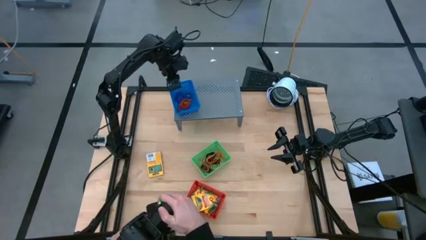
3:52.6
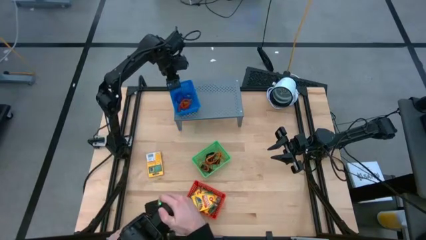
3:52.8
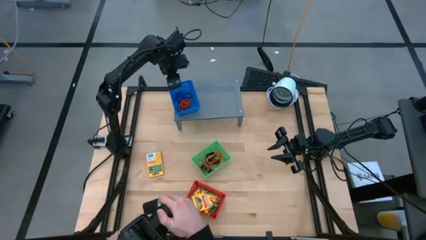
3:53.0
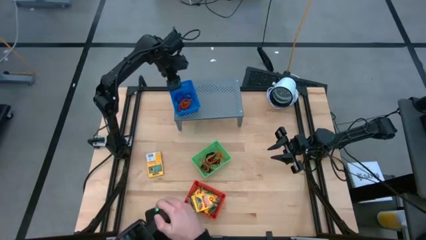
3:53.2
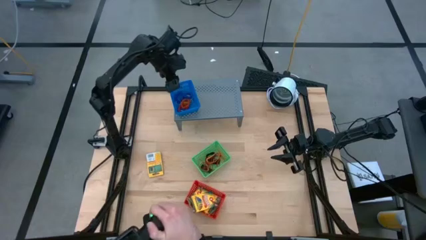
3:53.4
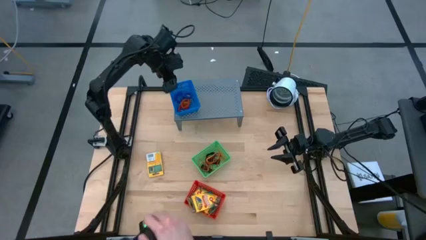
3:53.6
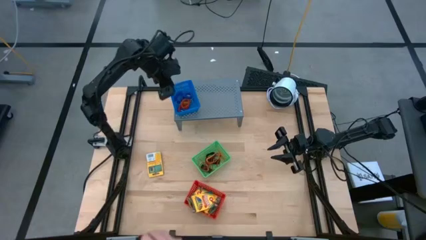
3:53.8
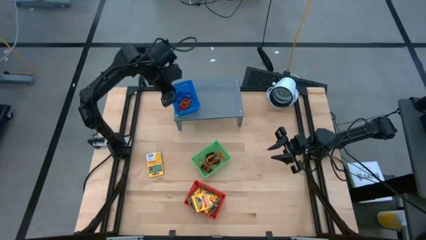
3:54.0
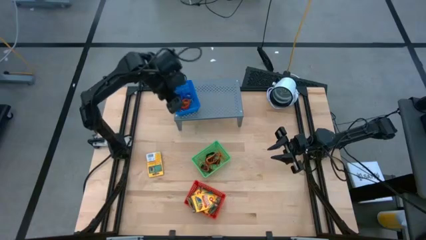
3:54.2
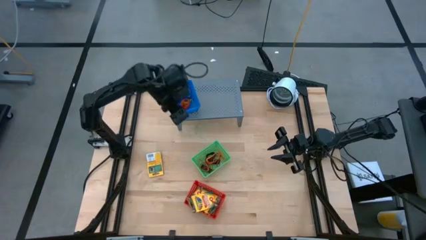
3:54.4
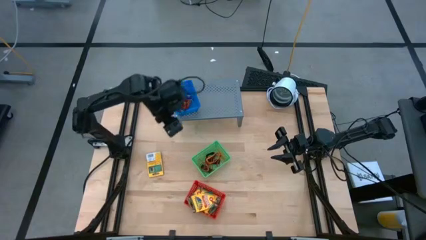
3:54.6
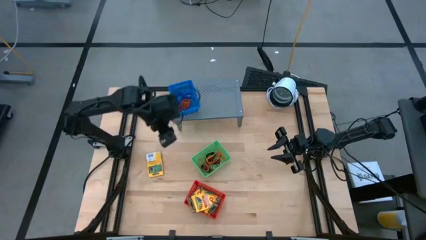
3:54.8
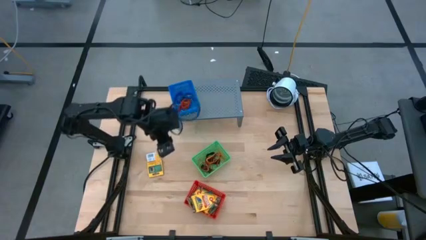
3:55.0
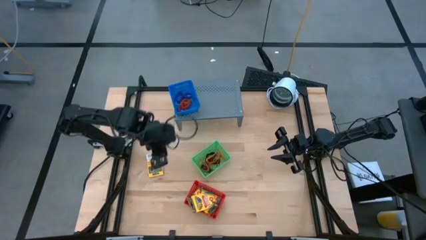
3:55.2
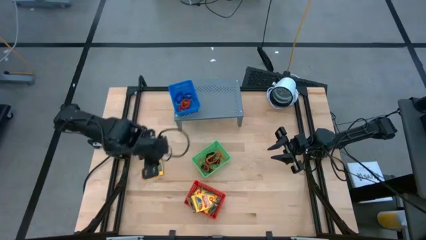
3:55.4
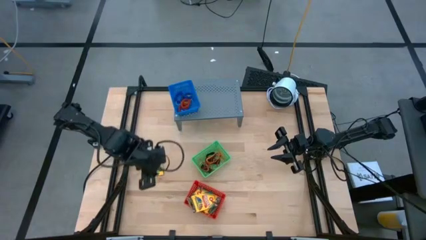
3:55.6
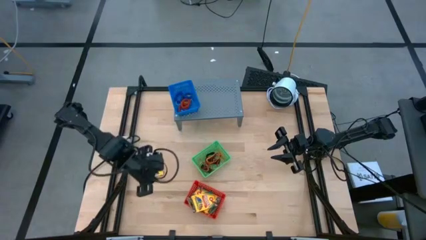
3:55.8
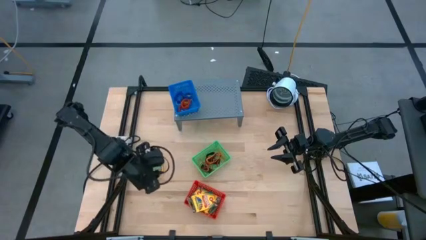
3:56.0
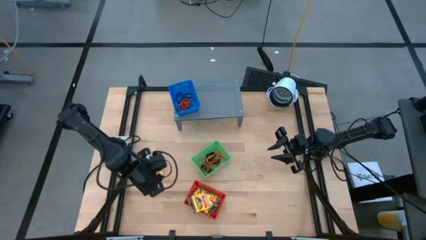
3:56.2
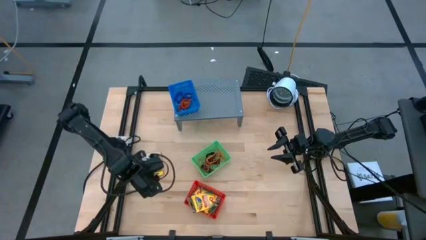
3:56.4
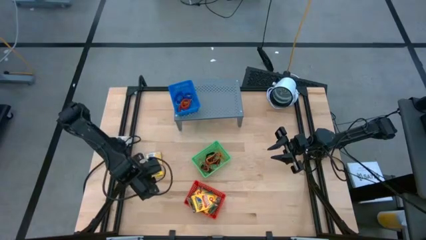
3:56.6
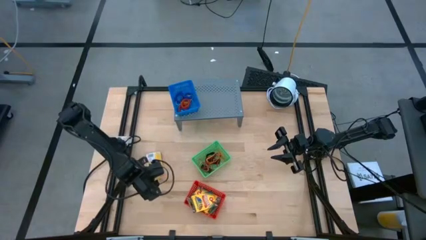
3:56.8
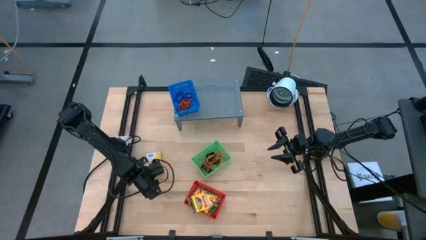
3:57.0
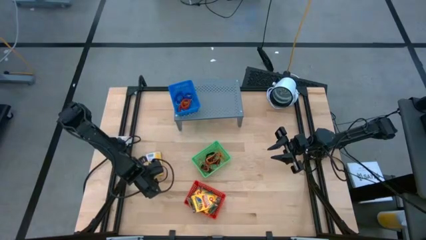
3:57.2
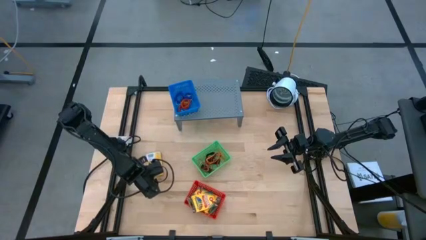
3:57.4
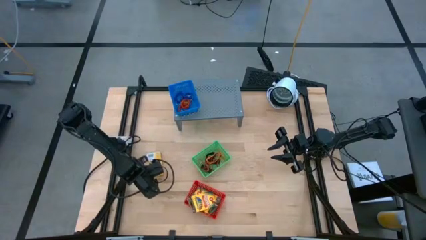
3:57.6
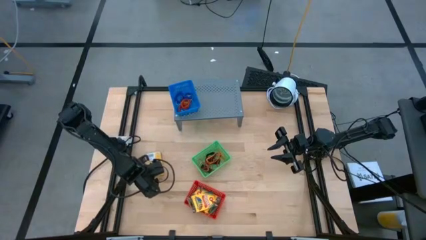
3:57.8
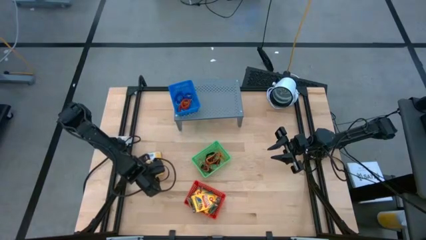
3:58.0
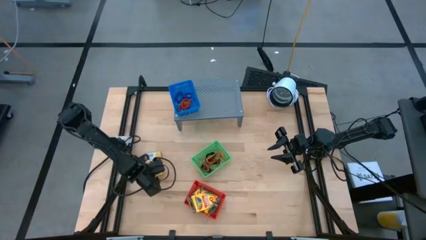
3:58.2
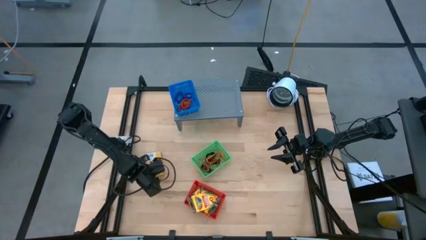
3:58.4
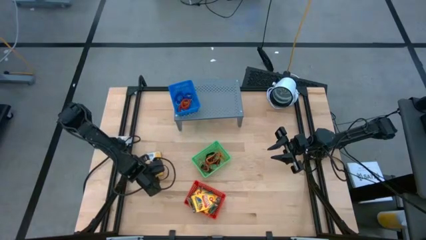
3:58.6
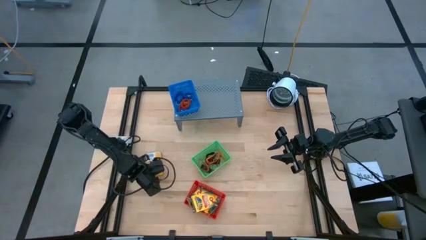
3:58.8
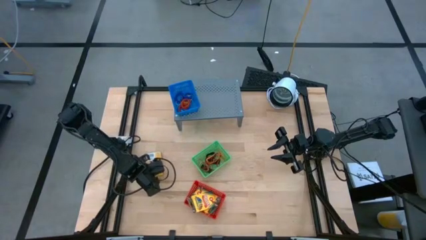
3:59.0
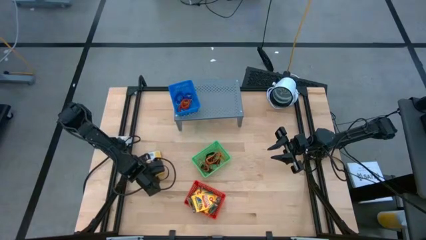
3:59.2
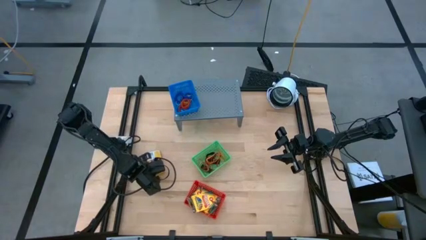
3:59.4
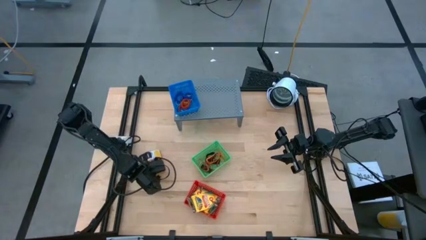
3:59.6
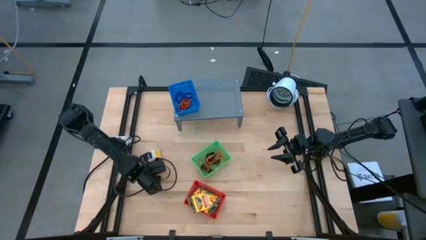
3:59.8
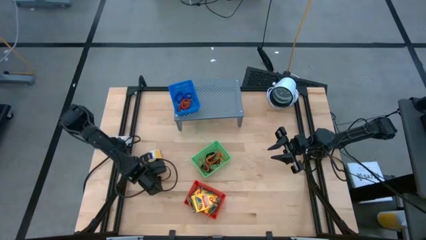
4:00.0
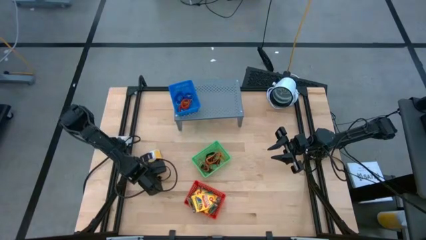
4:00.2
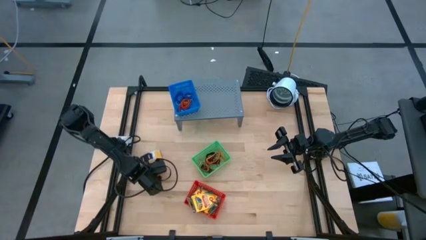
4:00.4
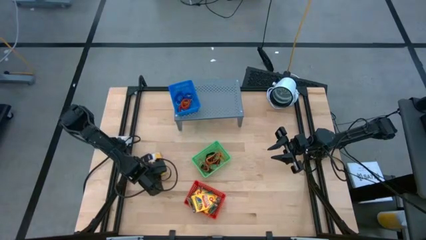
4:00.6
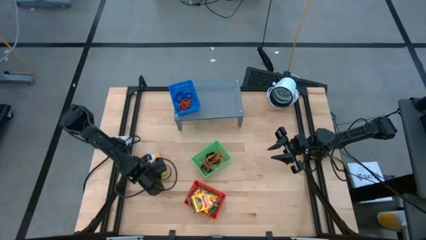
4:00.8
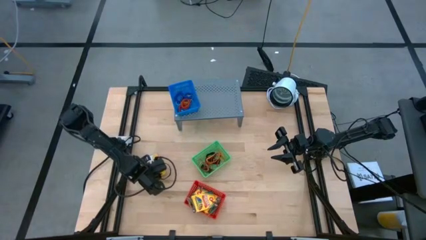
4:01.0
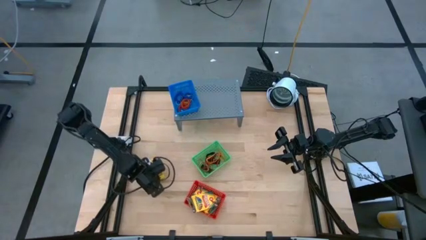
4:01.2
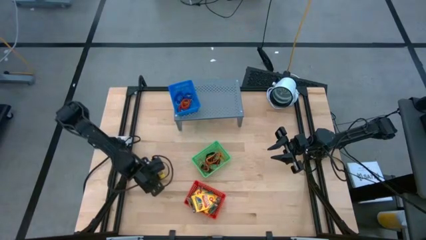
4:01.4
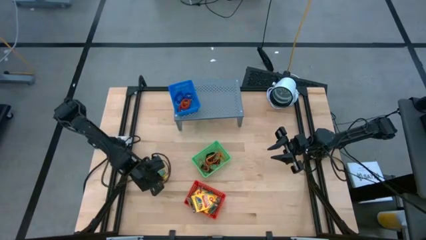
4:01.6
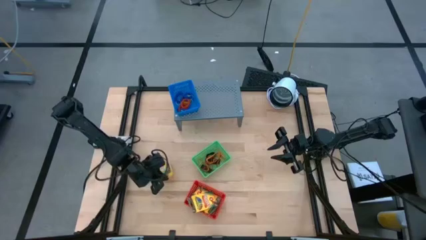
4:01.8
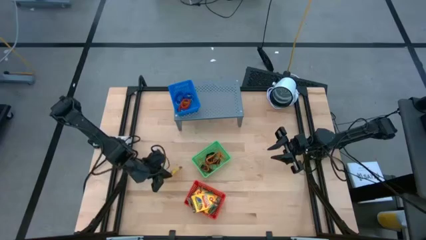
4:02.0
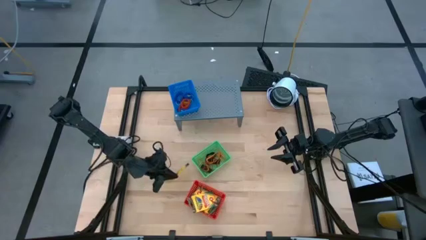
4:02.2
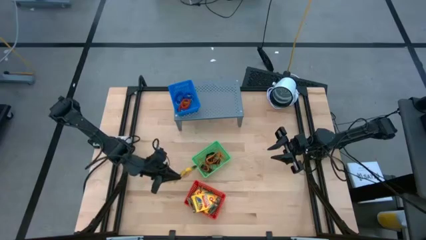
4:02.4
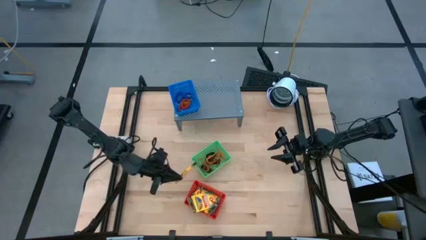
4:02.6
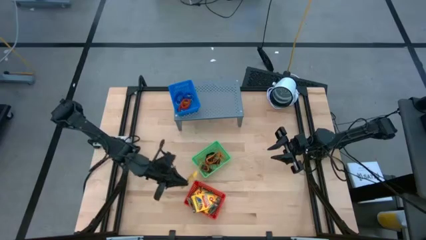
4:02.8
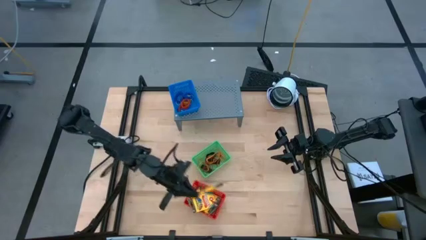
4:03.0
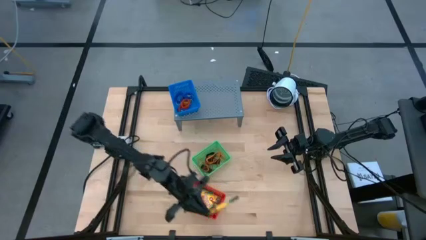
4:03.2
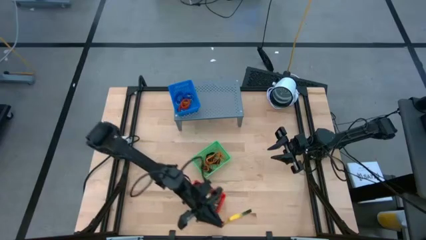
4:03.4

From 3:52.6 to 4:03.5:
Task: Pick & Place Office Desk Supplies
Put the yellow crayon box into the red basket
